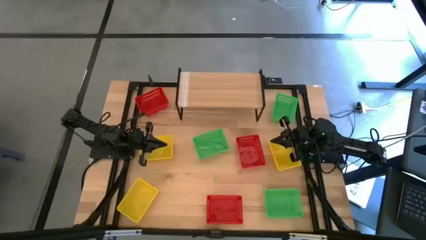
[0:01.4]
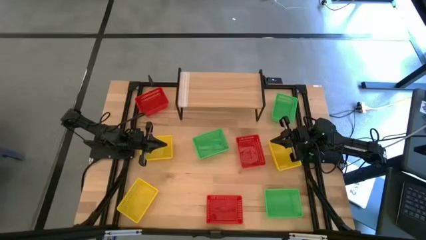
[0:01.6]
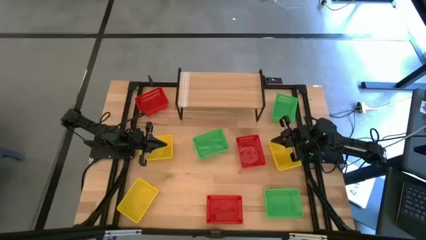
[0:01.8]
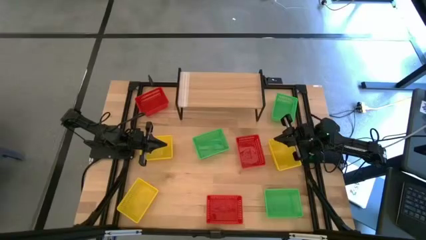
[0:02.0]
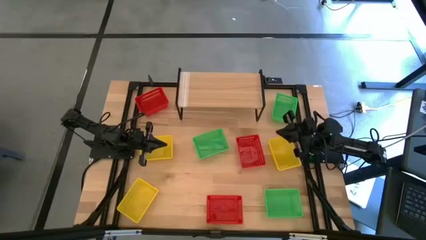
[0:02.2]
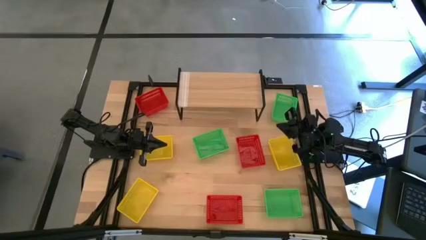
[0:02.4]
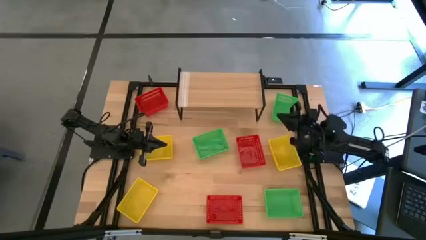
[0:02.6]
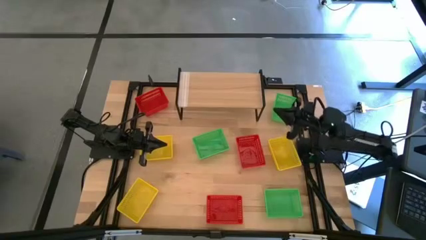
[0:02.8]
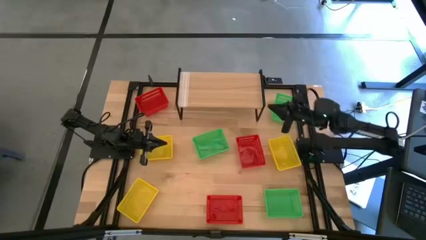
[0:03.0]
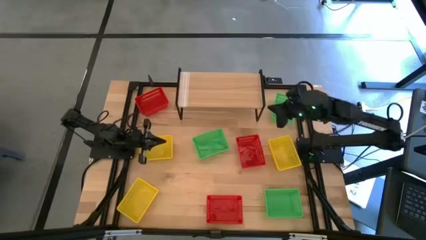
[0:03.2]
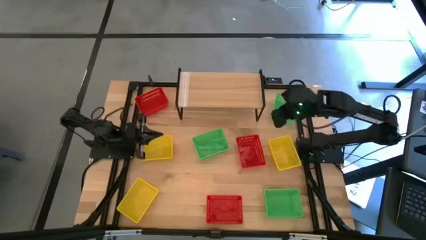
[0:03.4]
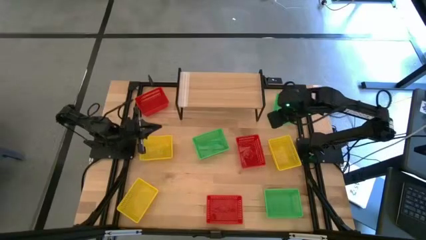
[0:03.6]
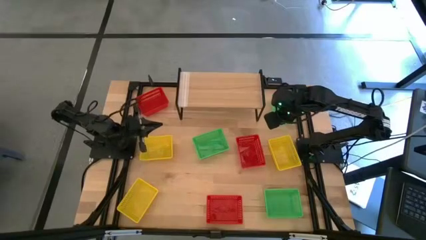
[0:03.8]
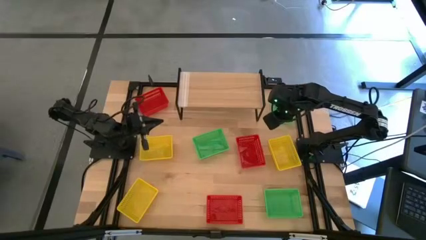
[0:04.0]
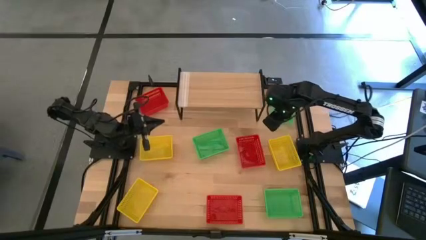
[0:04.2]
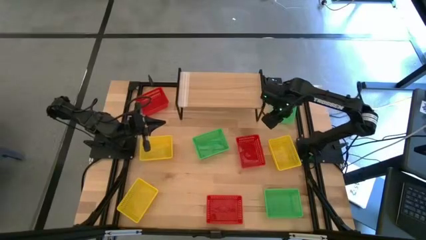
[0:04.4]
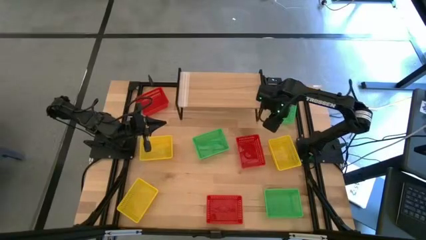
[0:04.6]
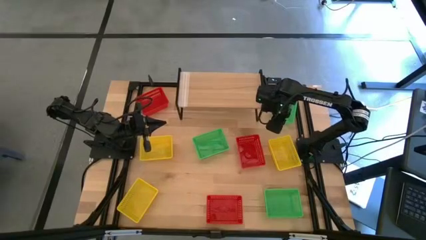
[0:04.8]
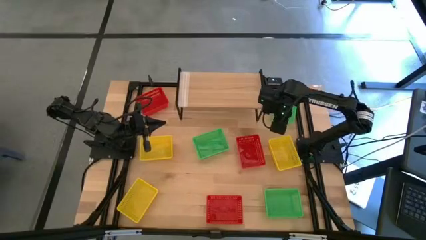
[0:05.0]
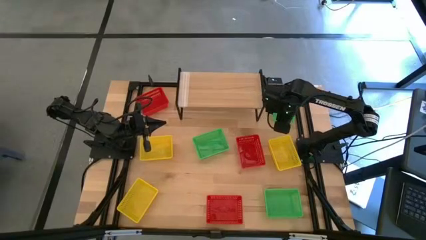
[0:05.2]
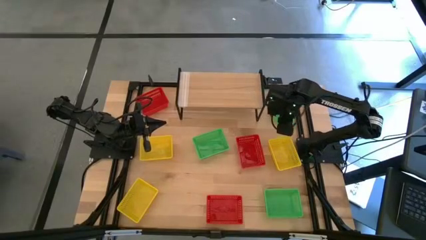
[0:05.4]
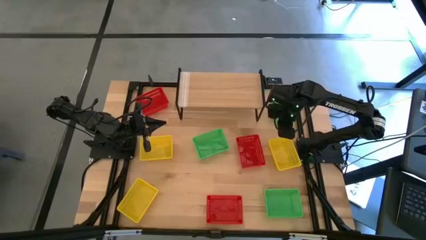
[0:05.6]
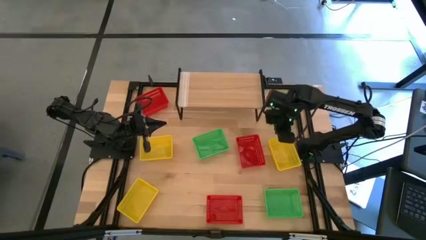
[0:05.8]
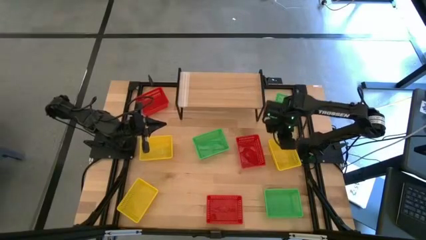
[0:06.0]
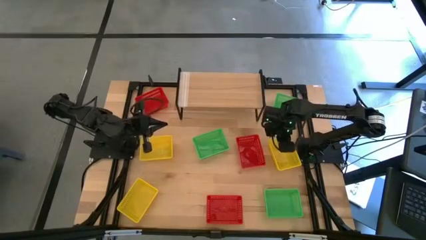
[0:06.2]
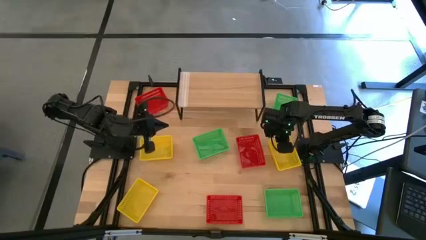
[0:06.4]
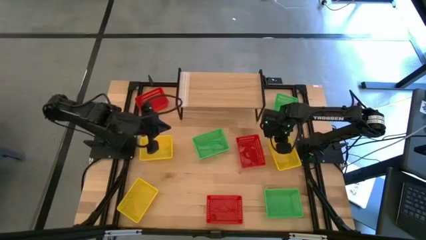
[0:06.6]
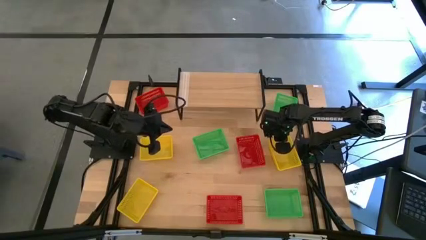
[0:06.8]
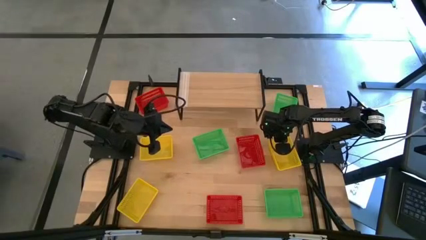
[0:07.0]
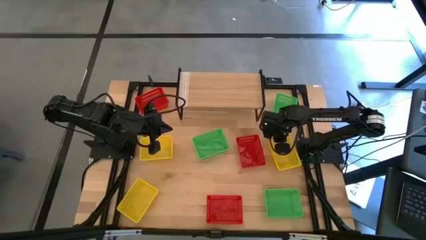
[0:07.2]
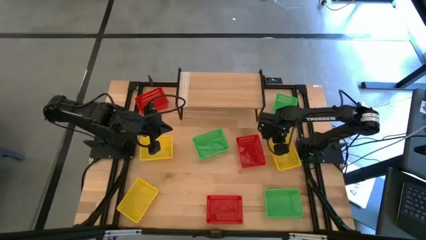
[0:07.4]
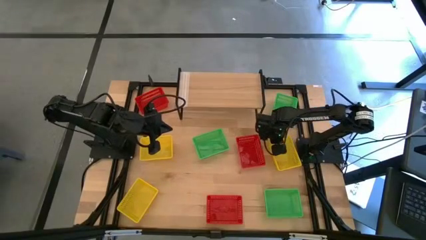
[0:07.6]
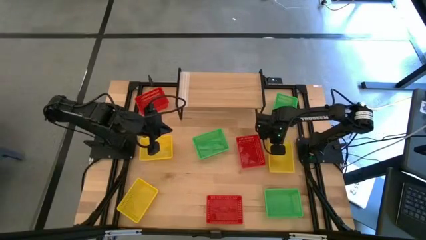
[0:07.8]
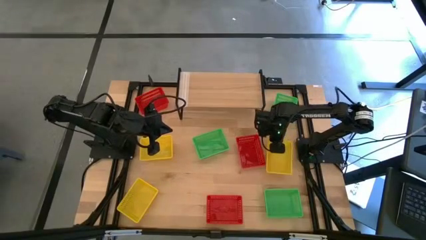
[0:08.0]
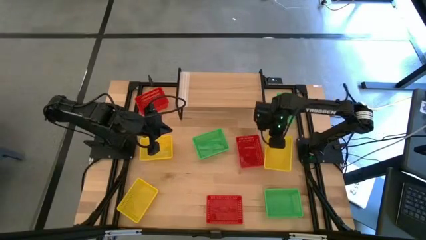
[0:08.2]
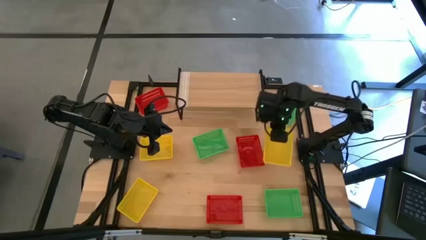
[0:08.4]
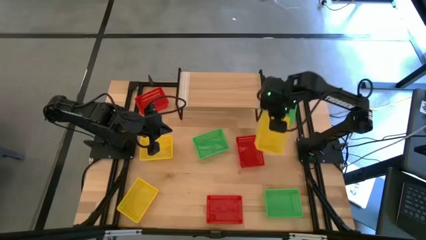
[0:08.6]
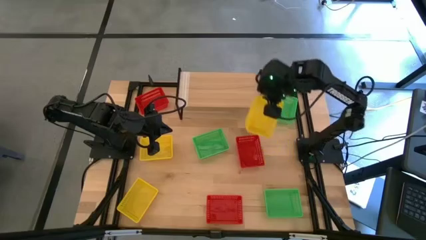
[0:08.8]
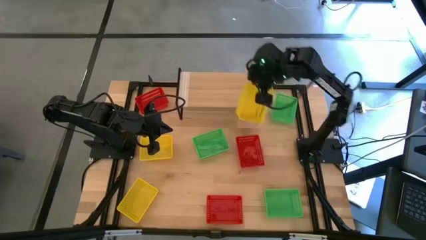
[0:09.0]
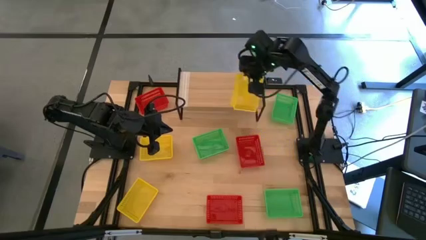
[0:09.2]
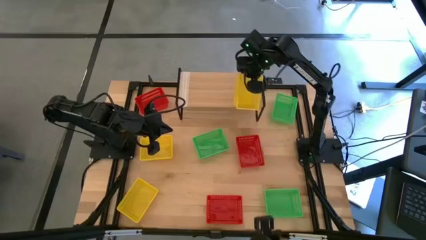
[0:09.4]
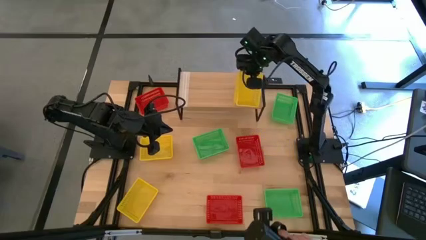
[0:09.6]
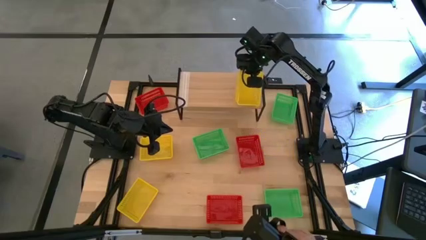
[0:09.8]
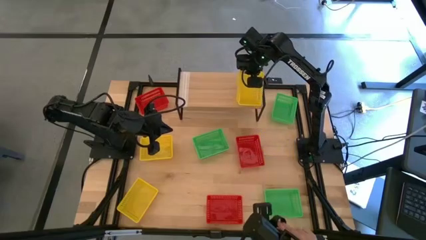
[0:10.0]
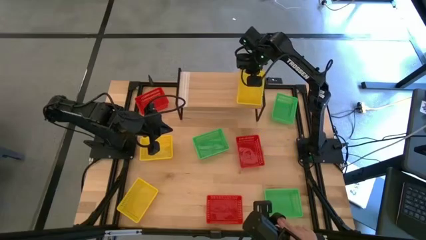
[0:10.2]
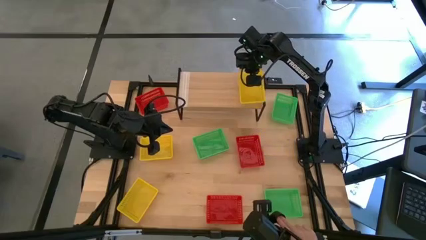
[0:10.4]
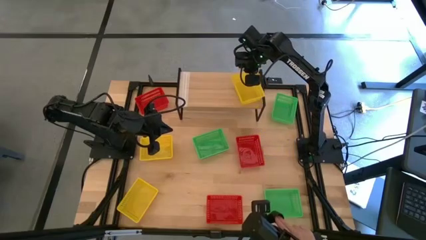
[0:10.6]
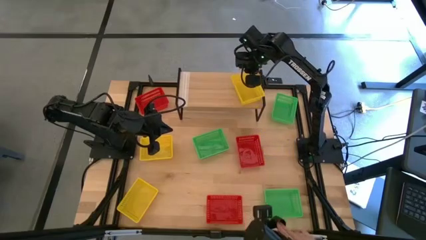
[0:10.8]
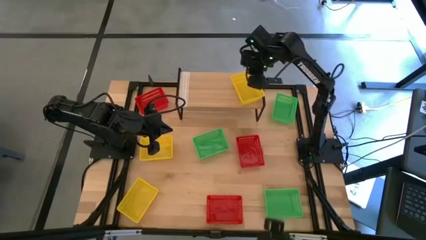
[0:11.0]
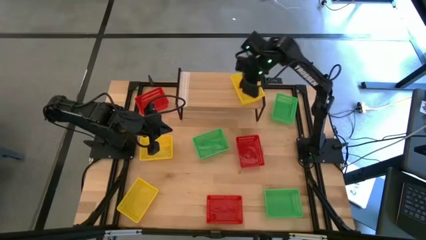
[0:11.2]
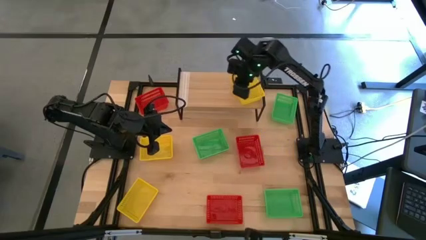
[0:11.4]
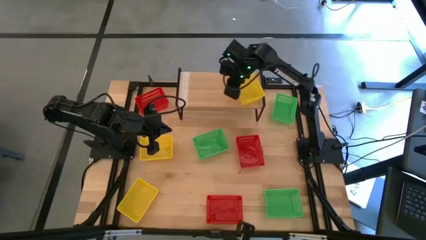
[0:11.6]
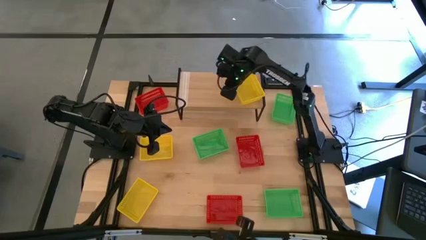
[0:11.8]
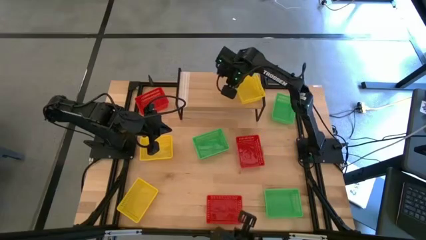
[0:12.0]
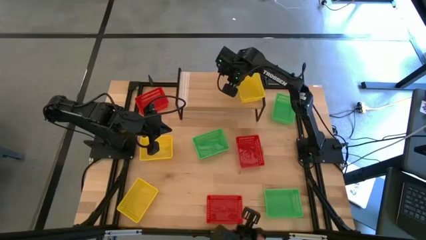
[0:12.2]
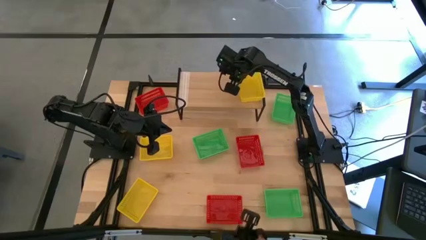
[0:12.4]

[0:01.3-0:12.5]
Task: Stack baskets on shelf by color
Put the top right yellow bin on the shelf
